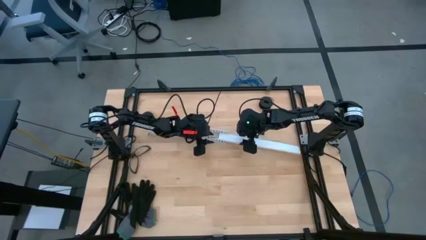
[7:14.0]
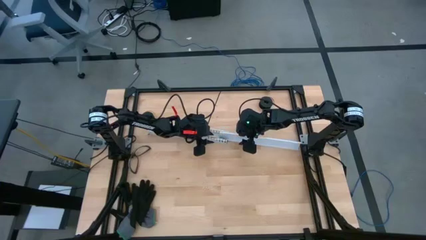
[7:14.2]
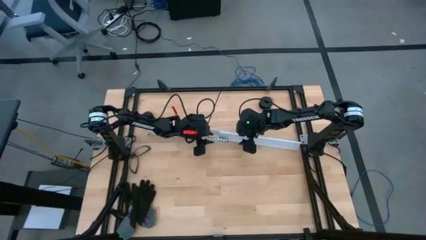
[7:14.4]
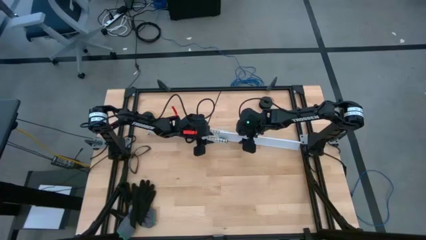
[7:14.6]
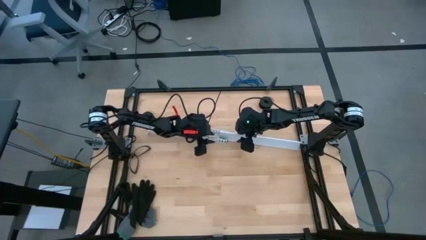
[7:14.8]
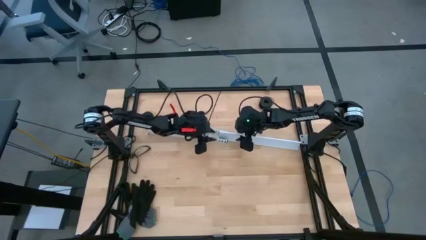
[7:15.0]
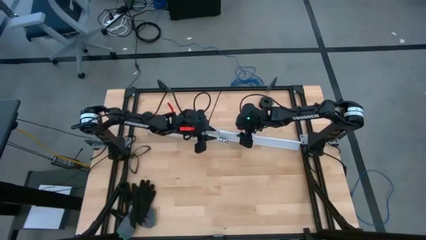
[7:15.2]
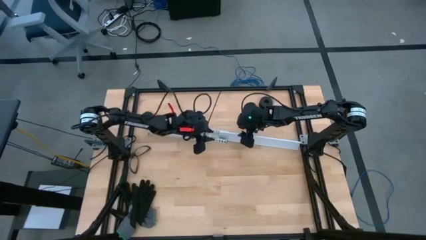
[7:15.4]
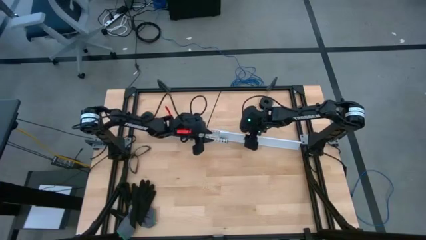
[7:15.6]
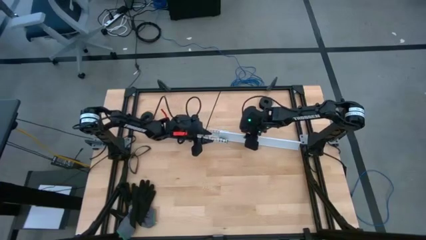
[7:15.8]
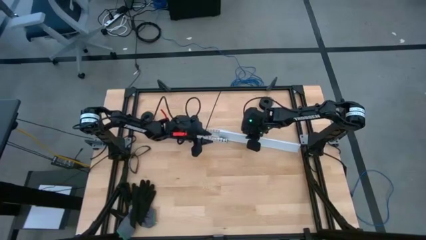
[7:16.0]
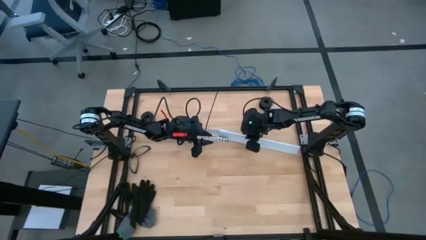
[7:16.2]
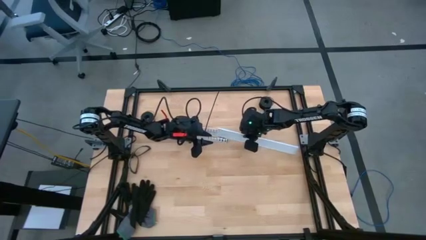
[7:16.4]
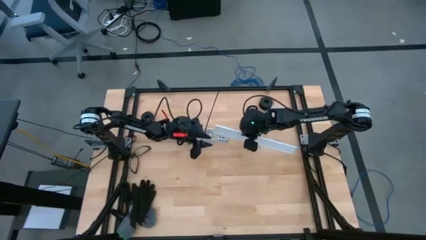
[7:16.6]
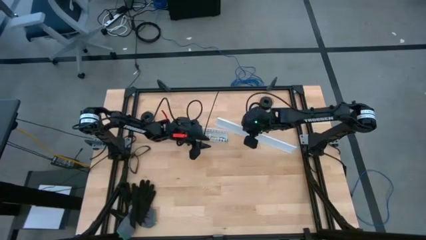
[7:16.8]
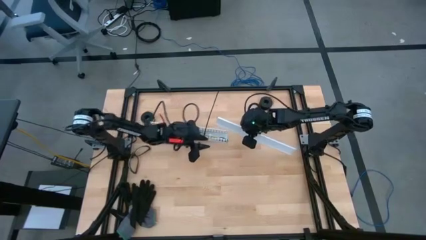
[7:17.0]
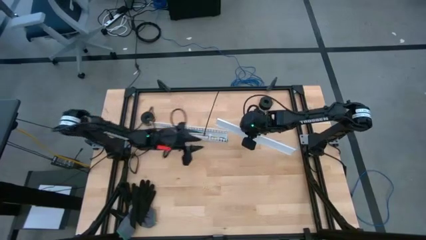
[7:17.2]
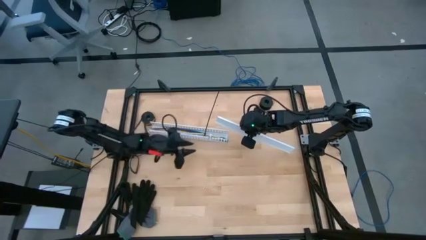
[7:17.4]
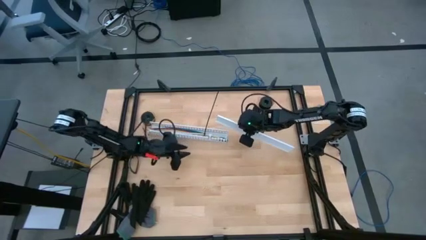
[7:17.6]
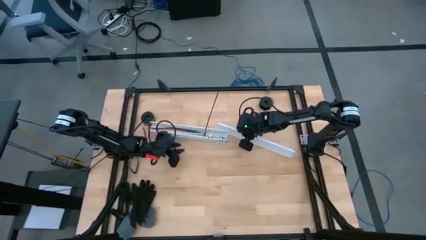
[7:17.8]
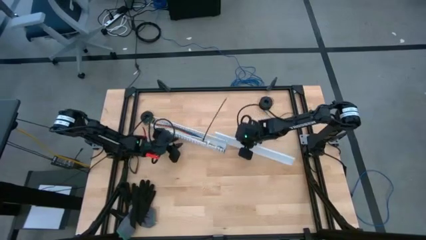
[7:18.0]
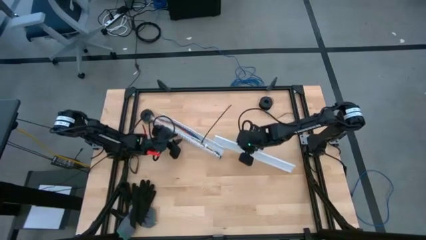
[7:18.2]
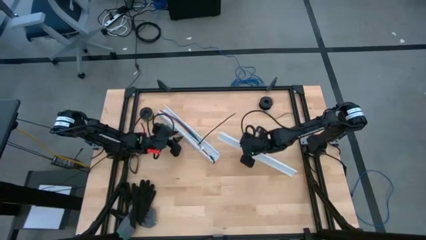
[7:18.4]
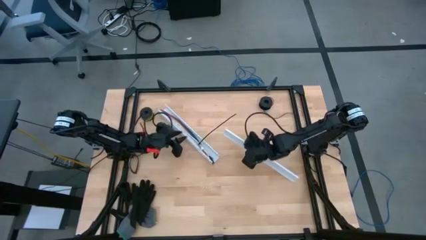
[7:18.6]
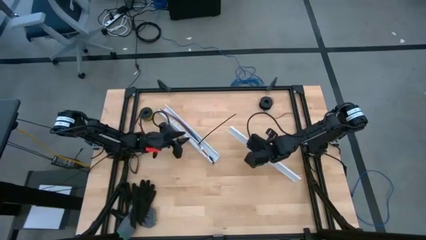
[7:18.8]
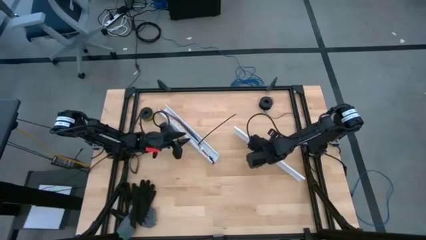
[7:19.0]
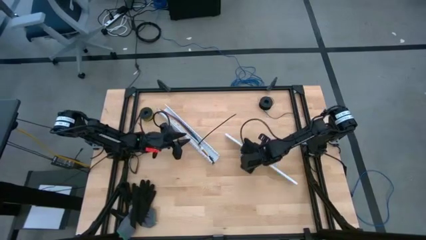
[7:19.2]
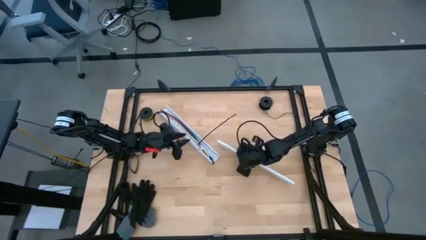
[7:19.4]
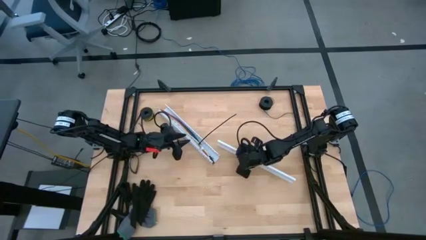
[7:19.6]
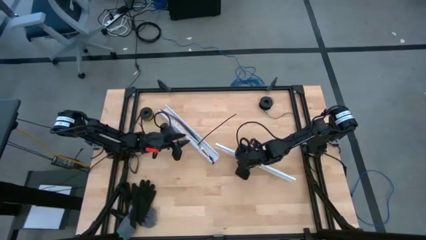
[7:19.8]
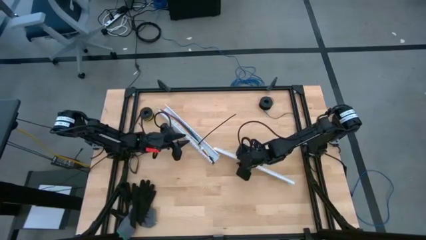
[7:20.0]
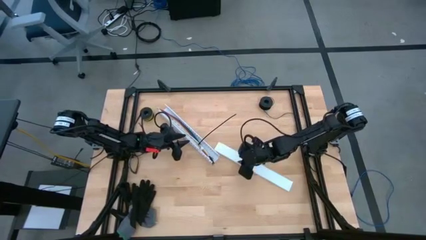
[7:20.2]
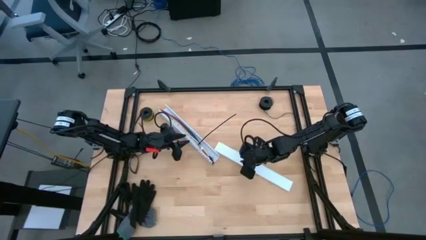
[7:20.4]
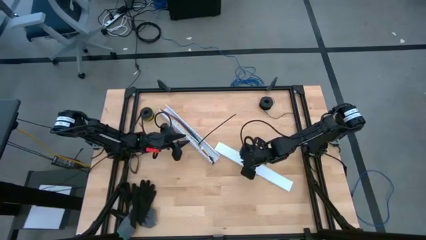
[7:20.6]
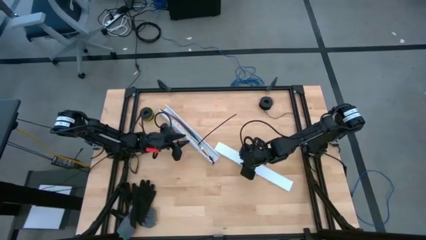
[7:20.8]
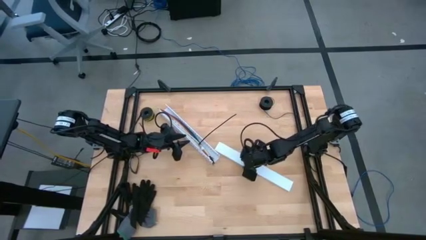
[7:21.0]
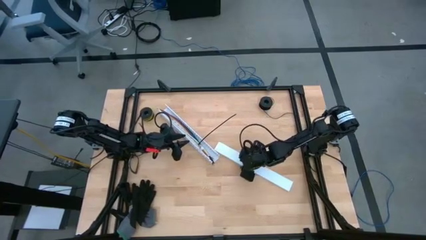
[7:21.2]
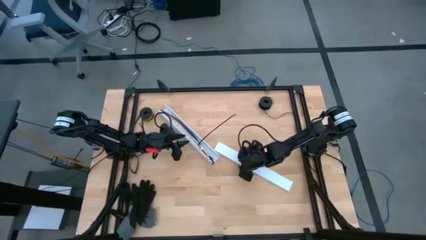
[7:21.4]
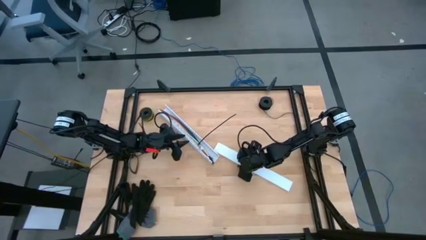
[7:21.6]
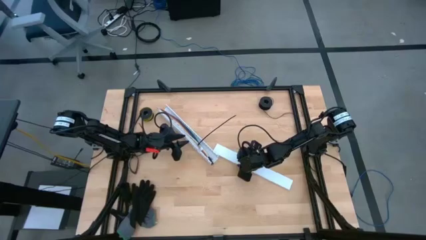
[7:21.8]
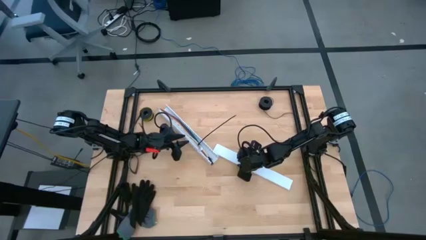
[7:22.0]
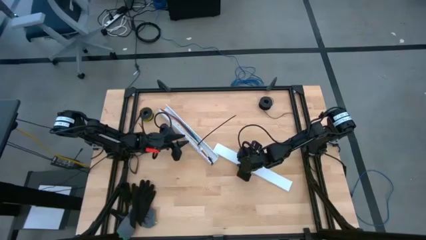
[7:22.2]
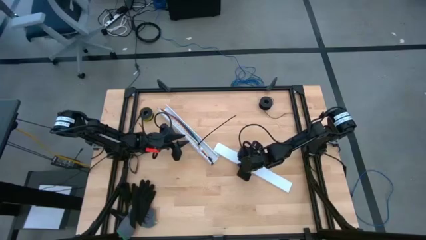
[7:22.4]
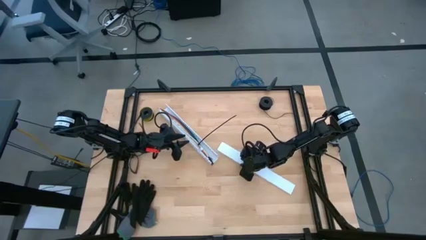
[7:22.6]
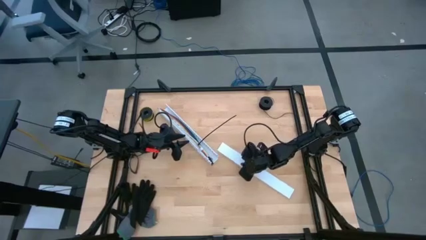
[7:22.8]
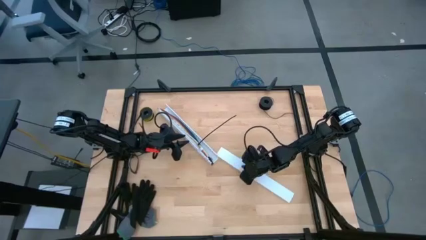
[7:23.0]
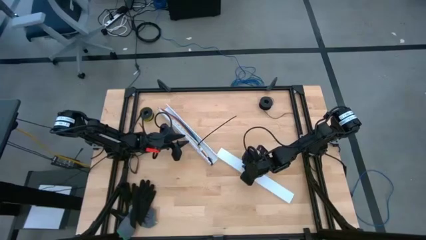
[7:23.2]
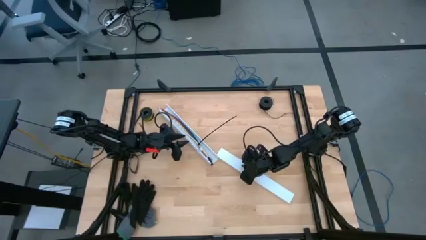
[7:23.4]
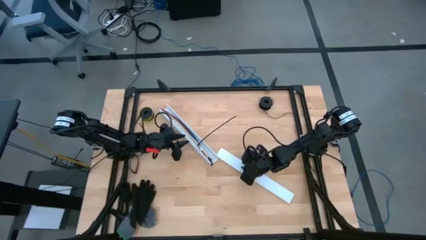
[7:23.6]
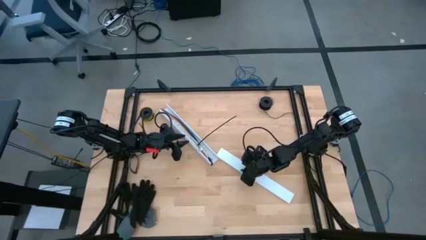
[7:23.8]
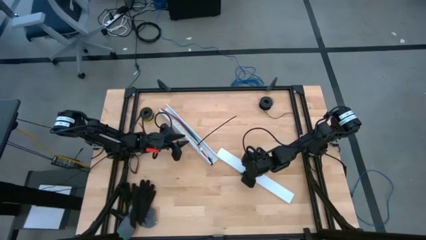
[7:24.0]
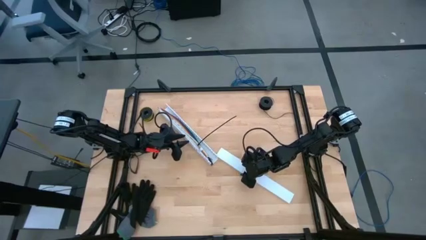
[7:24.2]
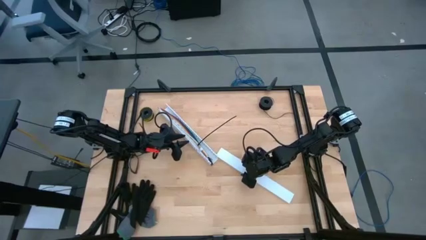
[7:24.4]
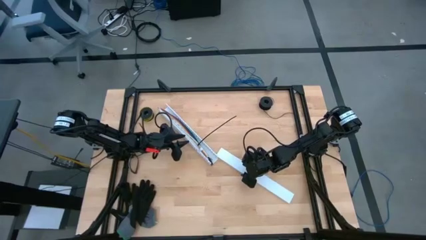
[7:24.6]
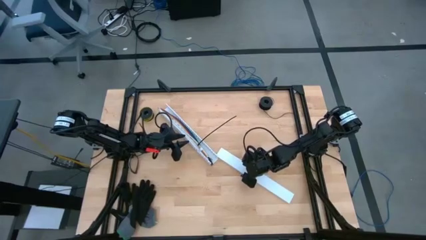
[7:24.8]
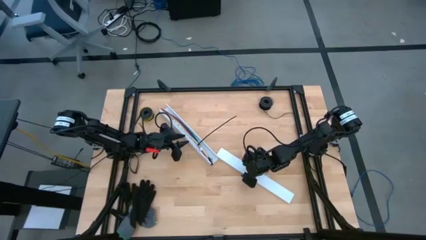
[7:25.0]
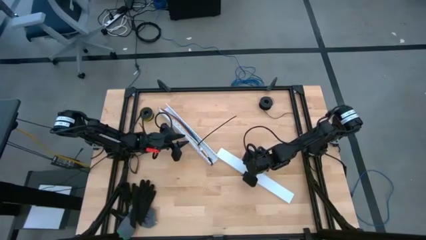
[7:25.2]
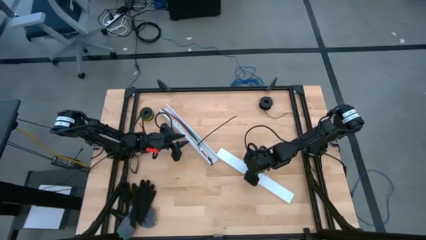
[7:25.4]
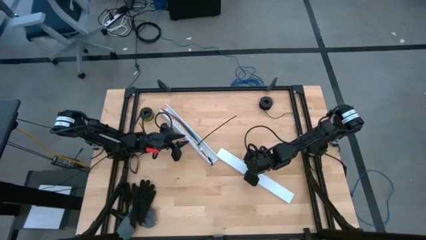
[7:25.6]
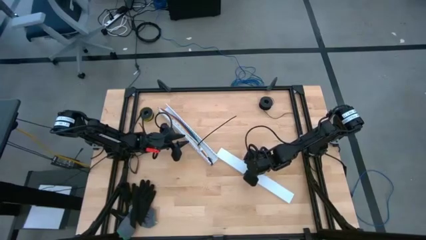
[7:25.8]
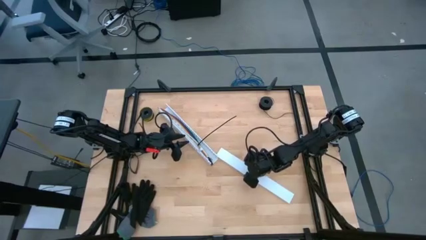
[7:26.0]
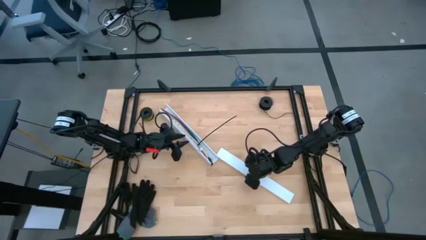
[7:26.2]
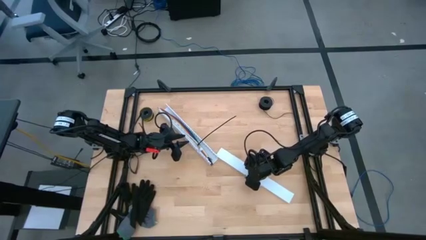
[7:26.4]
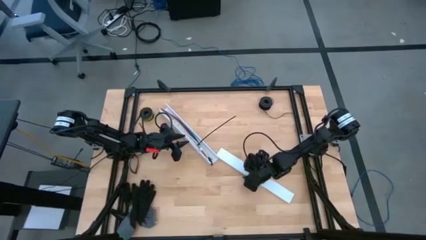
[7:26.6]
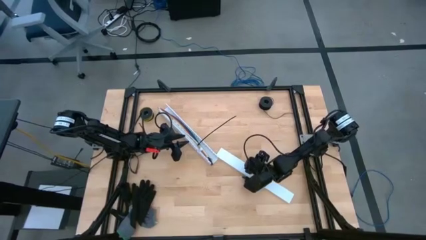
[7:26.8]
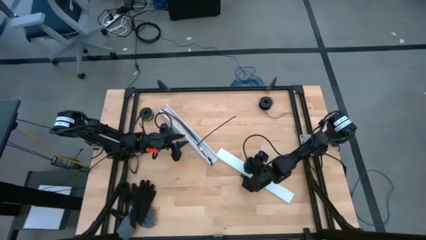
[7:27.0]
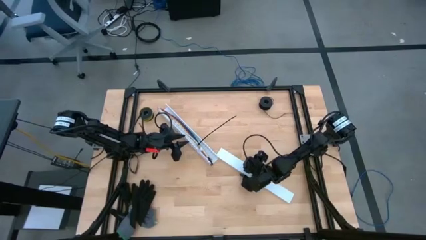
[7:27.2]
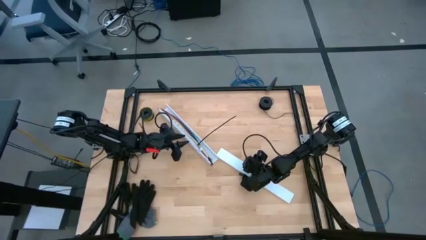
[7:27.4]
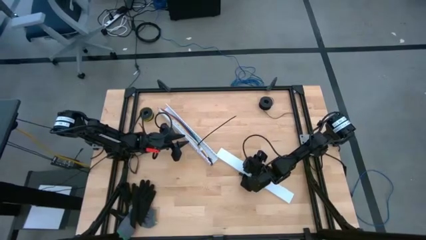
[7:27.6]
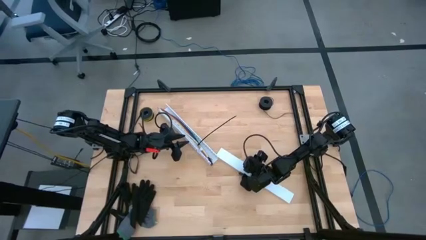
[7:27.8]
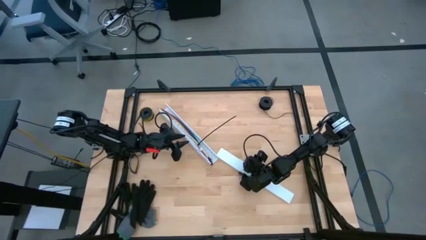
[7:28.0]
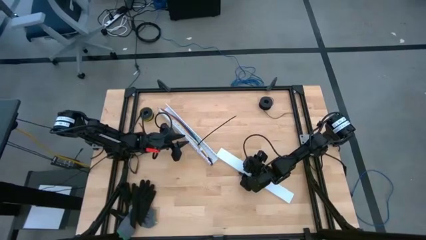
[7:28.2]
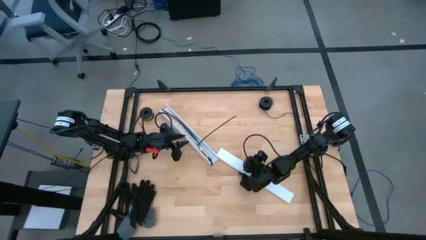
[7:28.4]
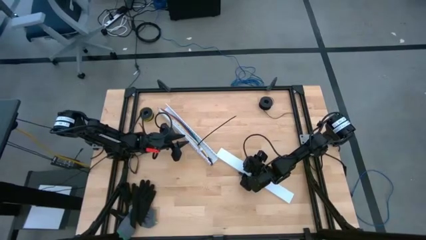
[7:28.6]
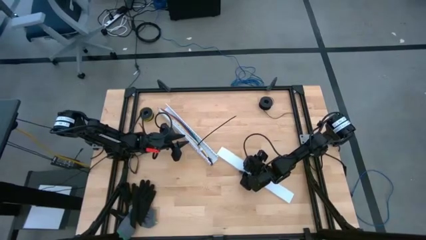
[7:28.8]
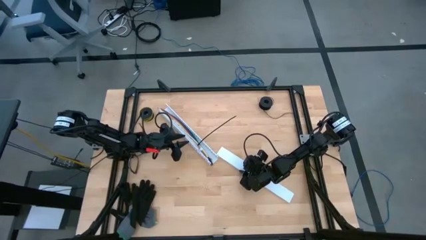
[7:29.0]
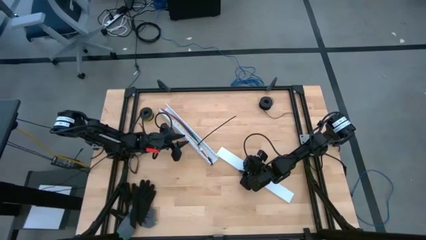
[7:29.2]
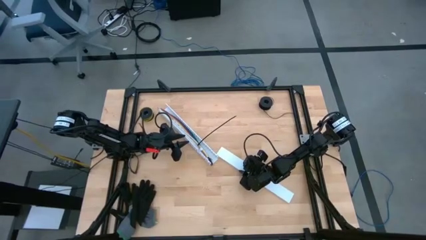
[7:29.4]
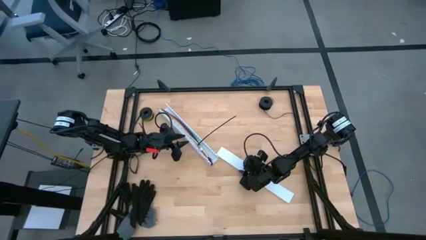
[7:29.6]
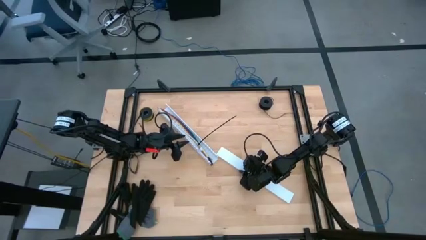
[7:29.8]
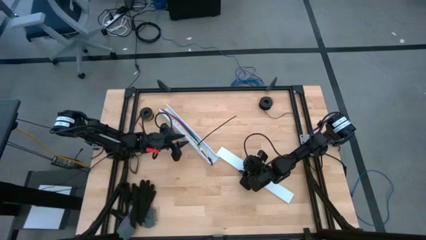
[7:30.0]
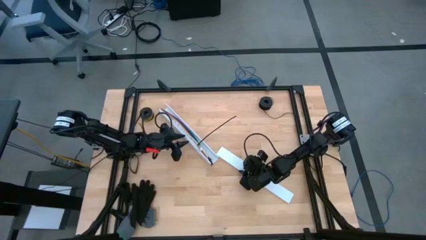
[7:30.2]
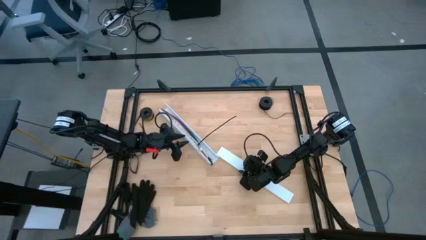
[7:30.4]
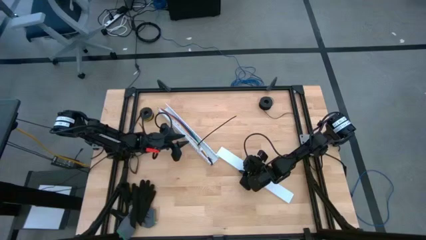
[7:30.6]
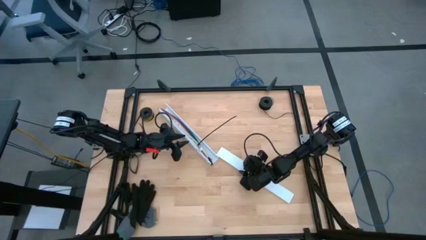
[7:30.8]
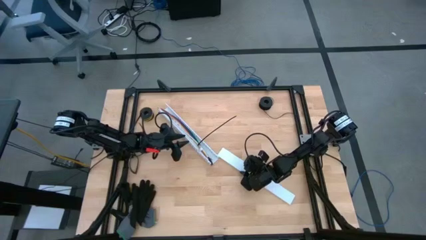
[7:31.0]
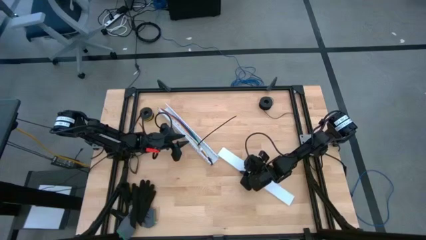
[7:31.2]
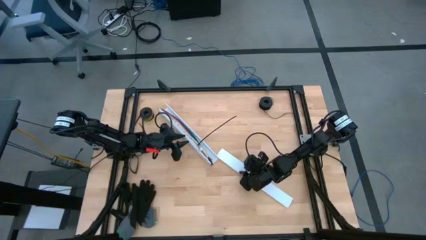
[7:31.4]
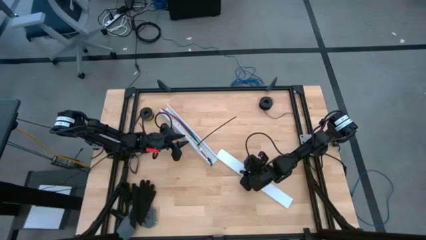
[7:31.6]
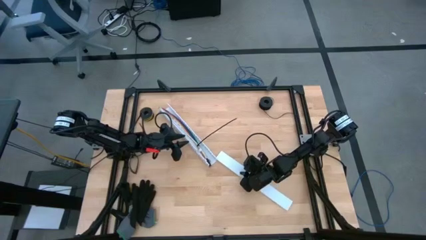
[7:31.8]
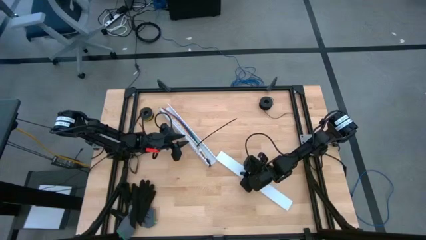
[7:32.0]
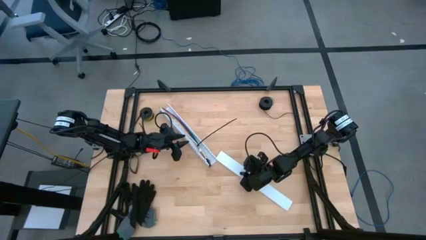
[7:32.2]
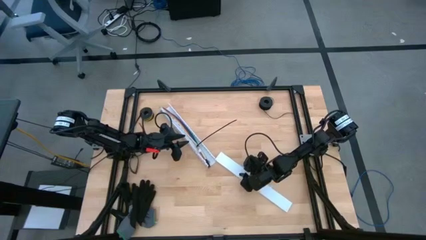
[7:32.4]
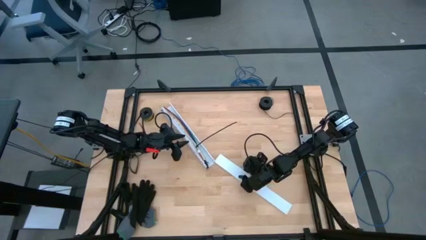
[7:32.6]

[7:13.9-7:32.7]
Task: Ziptie cables
Close the white cable duct
